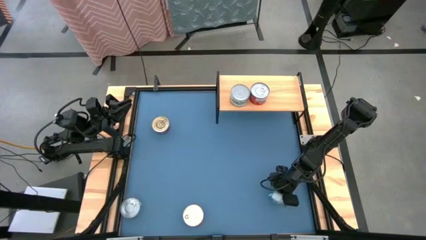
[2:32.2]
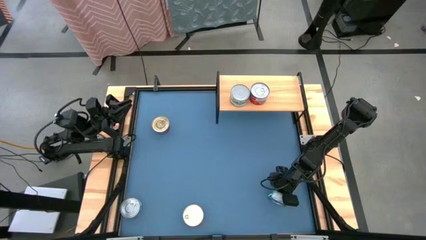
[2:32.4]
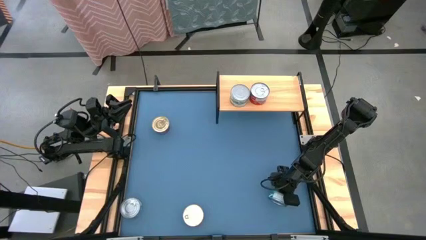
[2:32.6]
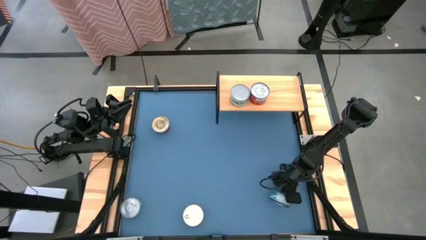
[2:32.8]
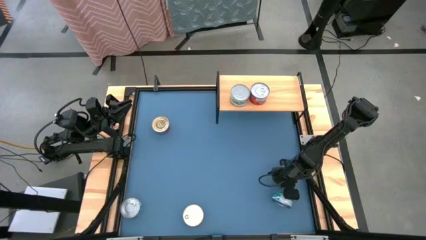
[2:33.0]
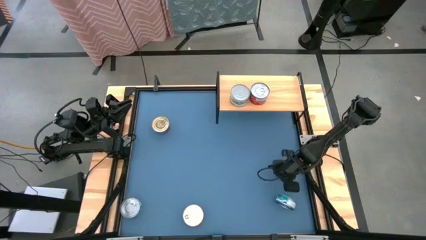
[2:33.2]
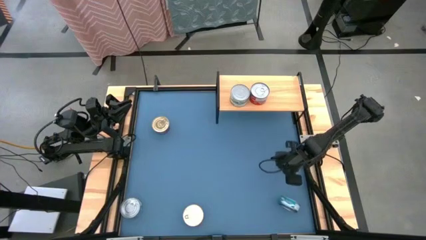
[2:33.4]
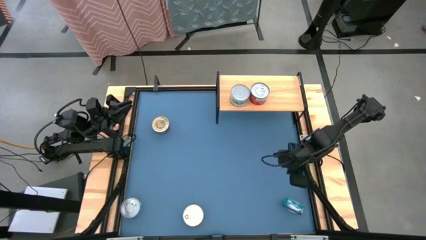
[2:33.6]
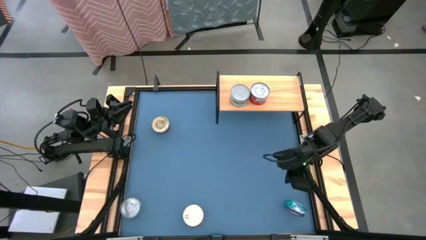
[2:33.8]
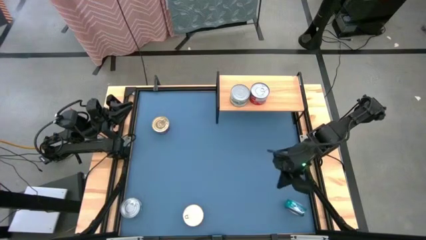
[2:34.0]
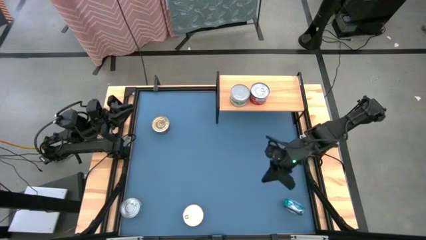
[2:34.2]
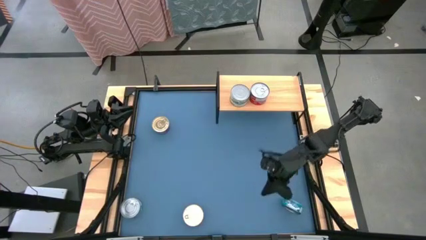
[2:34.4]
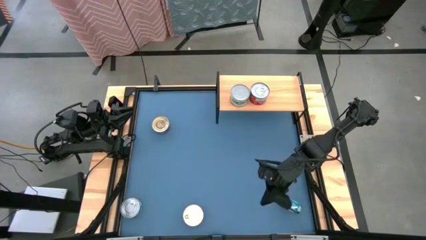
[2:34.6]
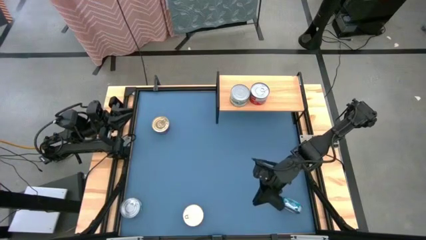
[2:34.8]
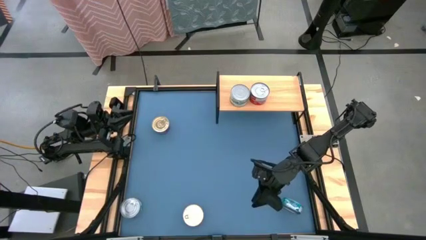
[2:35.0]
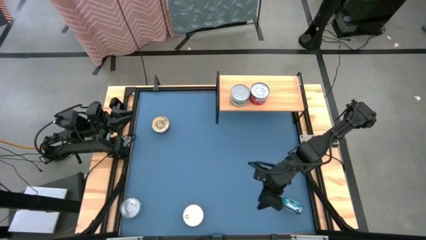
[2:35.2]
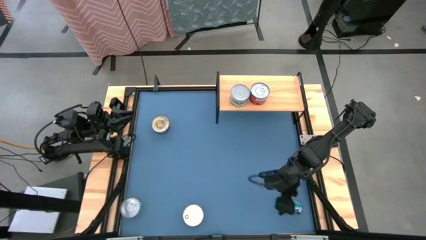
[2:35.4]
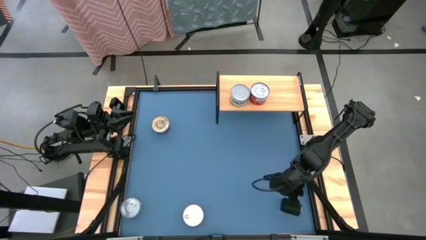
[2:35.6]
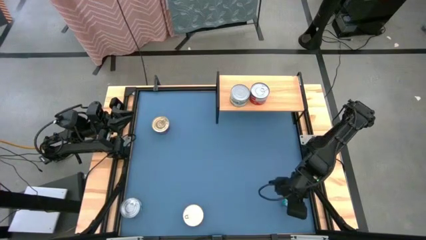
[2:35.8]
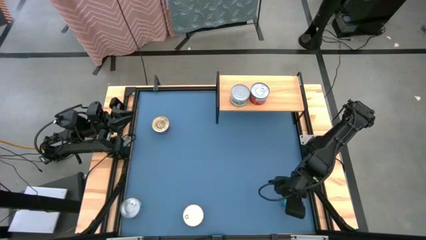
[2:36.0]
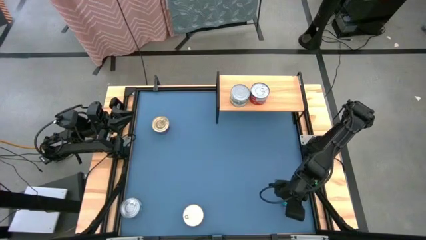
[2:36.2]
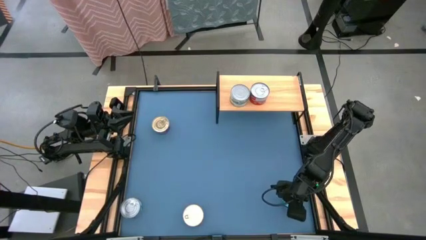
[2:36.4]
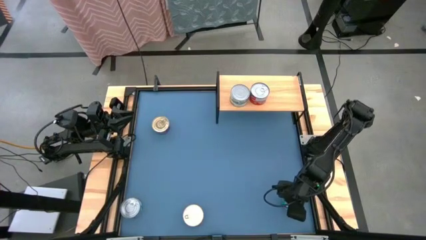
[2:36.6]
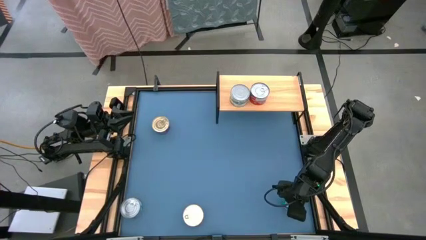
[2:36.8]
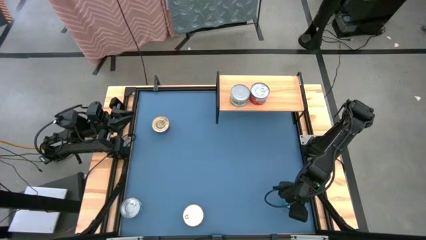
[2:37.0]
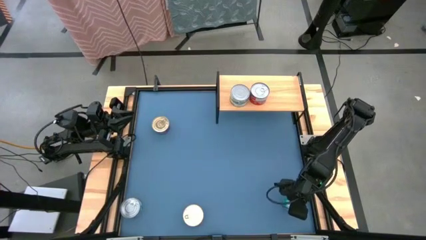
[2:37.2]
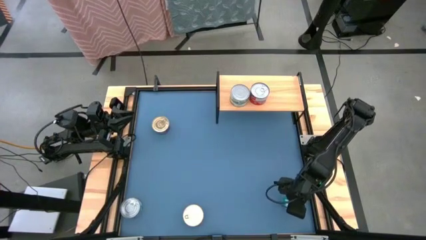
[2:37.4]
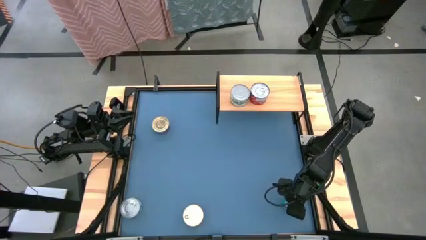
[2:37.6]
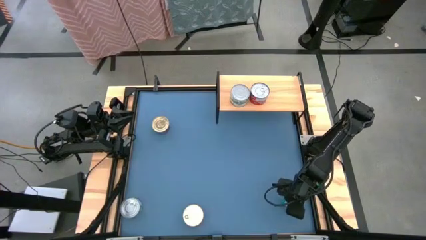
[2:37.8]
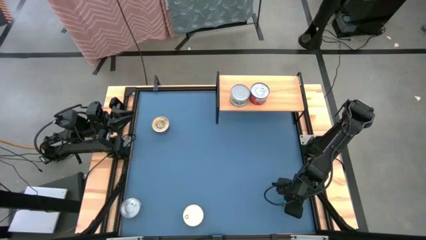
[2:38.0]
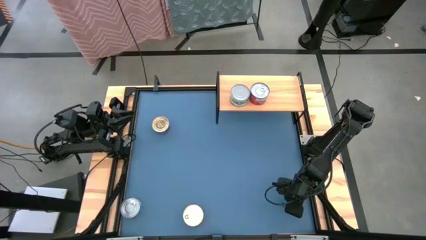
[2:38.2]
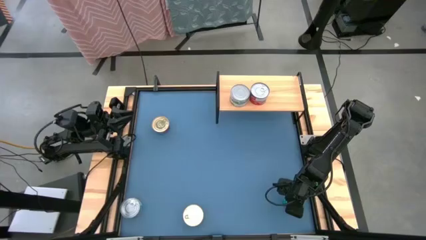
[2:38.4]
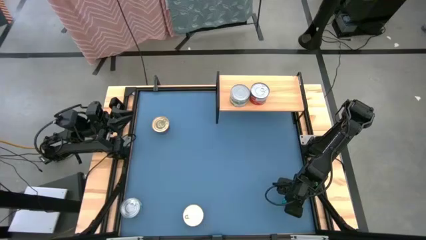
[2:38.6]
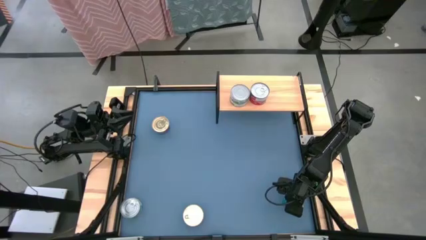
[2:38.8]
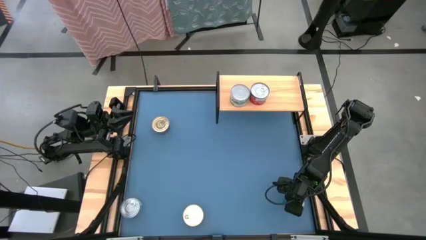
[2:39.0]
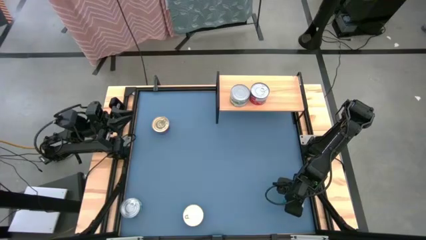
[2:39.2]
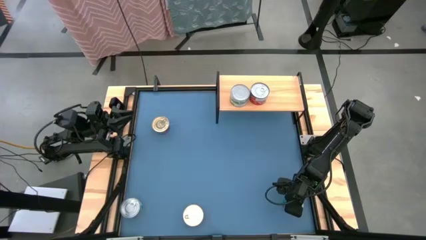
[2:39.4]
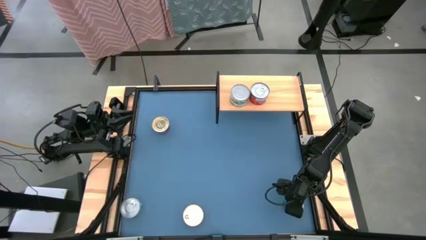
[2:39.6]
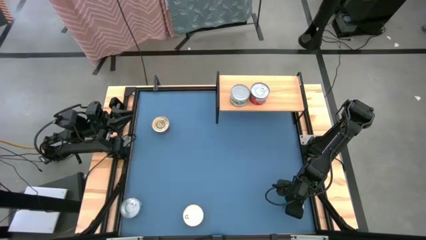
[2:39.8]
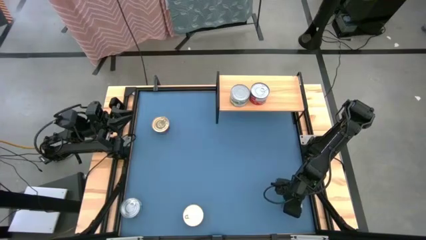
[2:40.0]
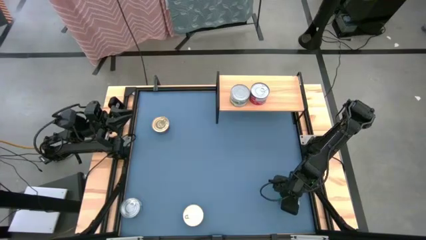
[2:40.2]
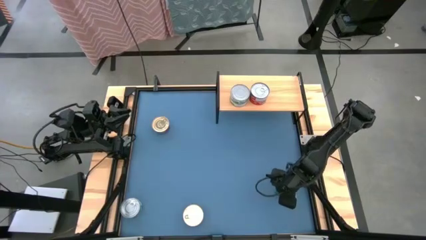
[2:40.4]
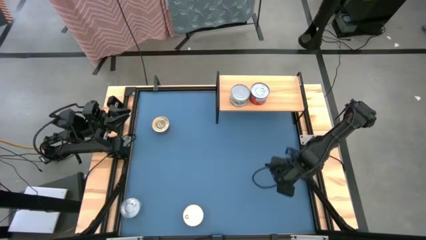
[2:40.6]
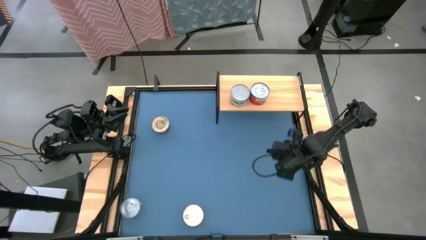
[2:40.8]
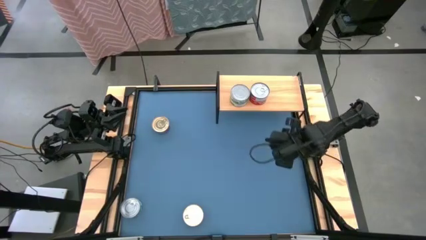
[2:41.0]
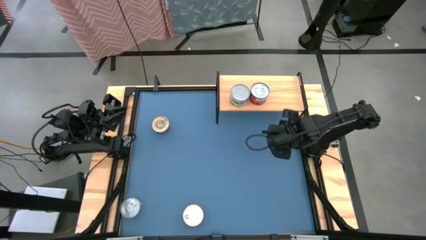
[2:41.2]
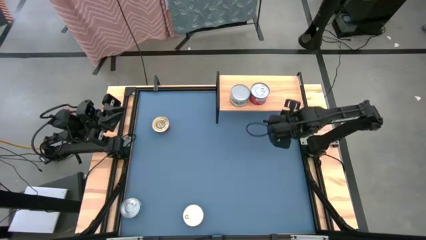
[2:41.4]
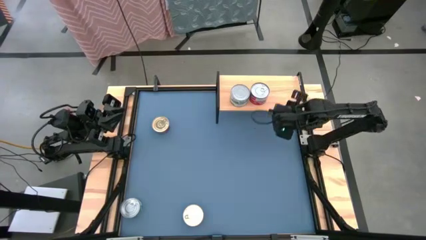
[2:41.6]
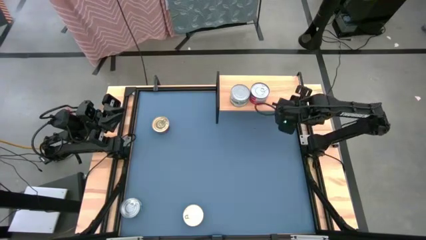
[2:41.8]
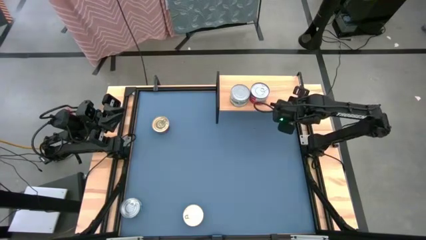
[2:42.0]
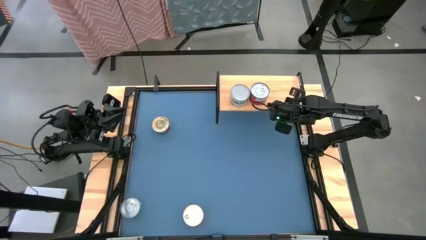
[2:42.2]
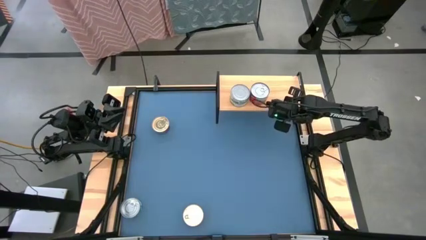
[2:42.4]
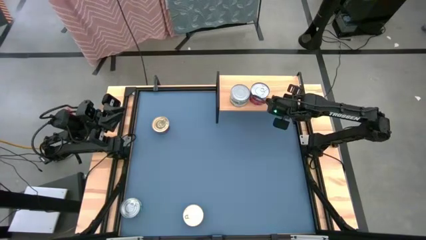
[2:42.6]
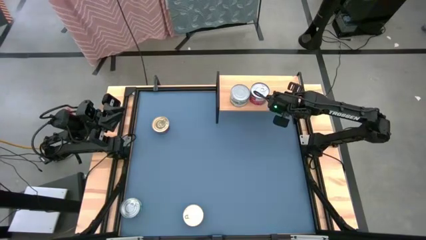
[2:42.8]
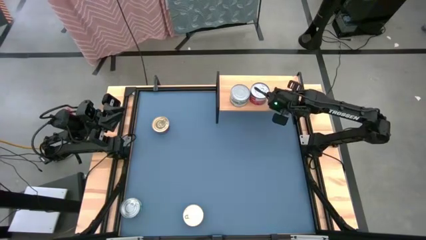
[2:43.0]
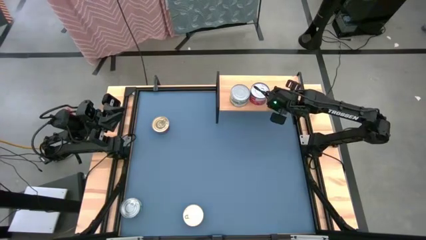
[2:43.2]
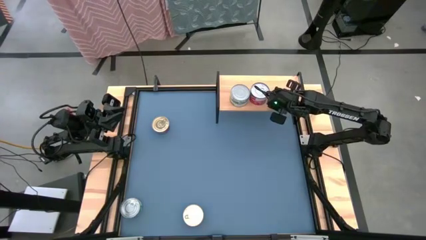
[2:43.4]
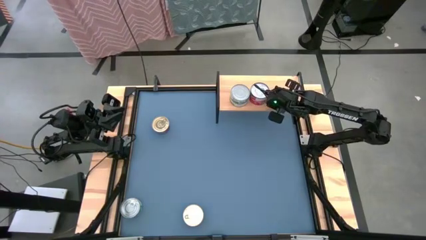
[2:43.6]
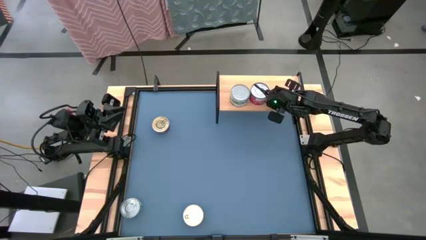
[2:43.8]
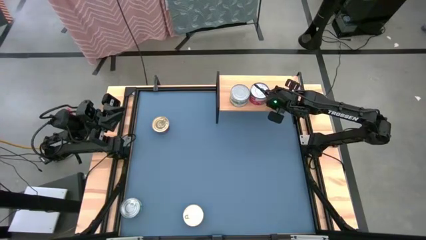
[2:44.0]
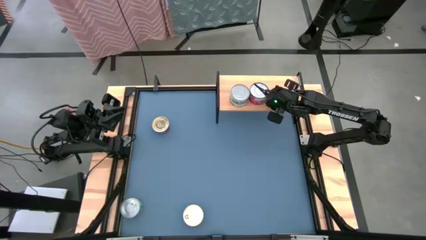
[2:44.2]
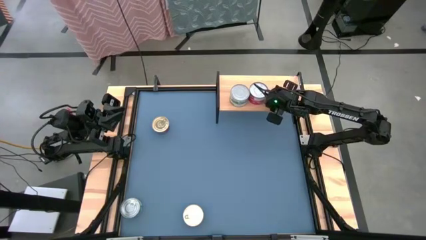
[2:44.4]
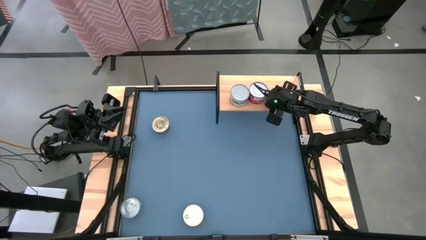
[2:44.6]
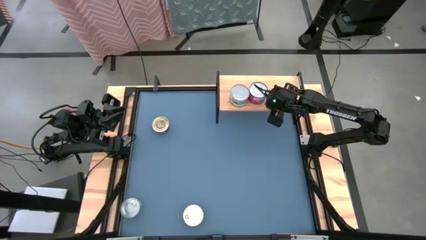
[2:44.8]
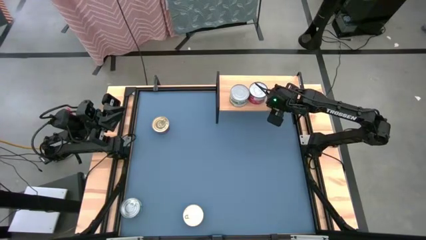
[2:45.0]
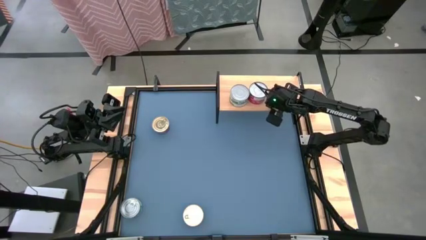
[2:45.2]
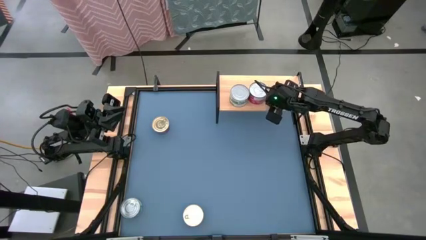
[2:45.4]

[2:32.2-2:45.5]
Task: Stack canned seafood by type on shelf
Put the right green-blue tuna can on the shelf

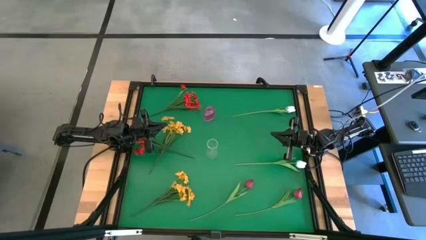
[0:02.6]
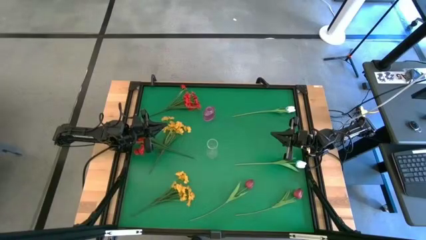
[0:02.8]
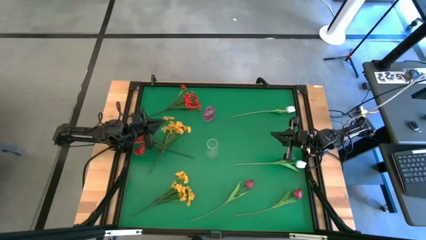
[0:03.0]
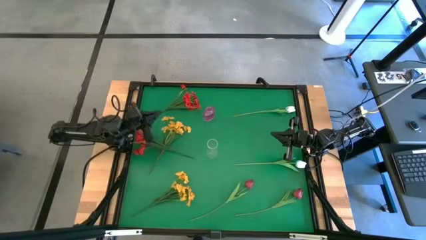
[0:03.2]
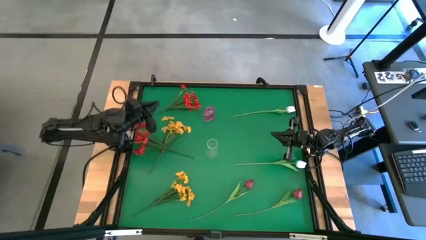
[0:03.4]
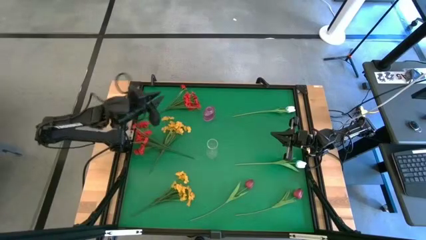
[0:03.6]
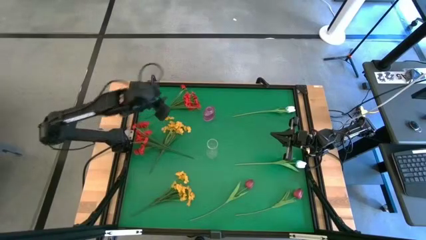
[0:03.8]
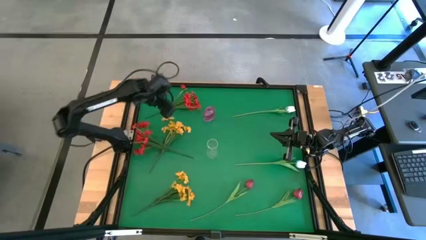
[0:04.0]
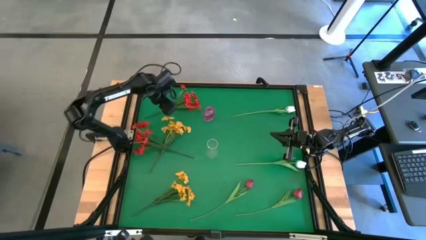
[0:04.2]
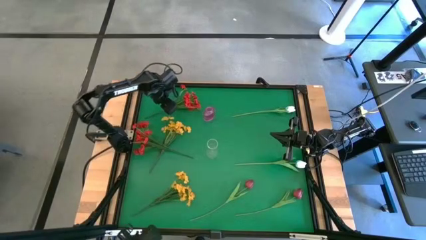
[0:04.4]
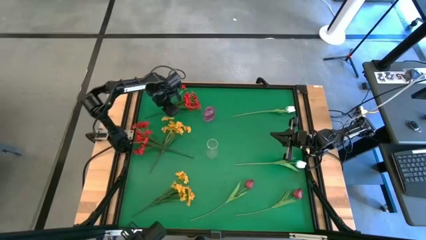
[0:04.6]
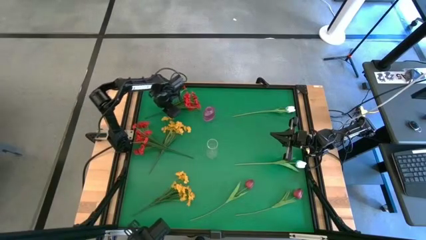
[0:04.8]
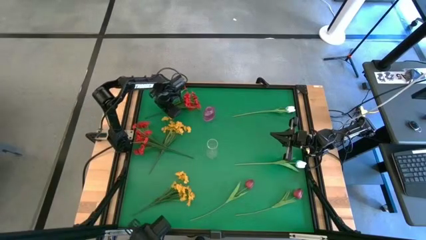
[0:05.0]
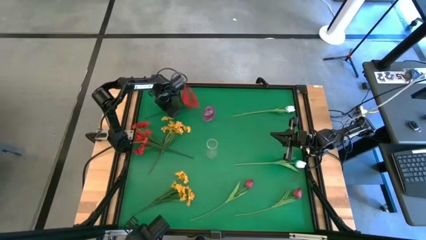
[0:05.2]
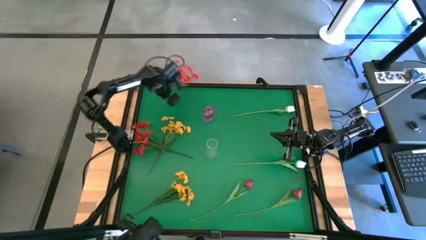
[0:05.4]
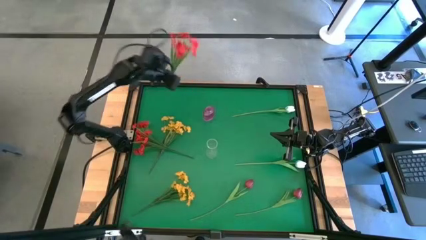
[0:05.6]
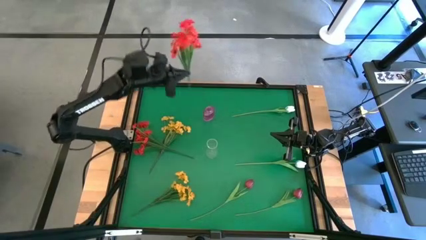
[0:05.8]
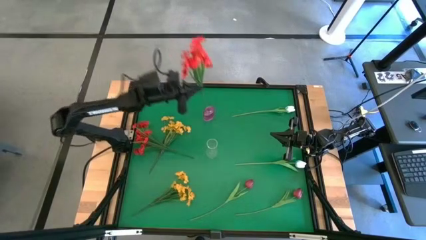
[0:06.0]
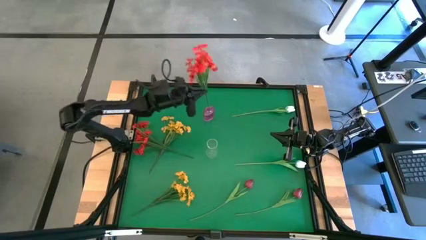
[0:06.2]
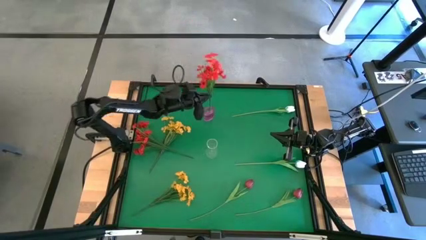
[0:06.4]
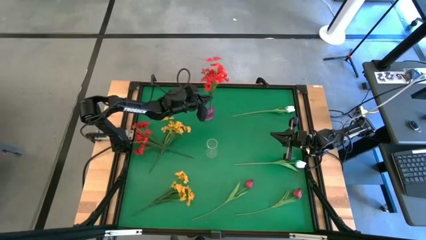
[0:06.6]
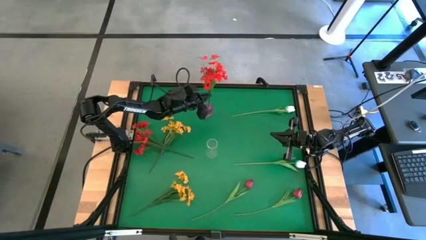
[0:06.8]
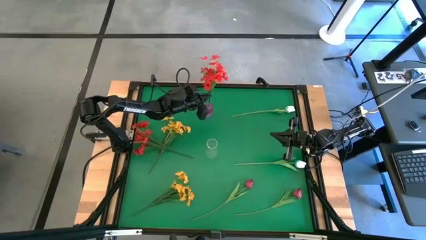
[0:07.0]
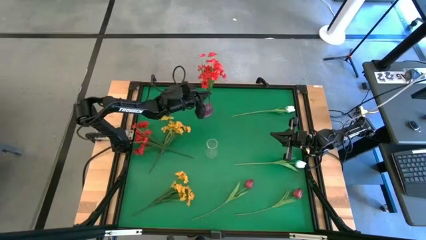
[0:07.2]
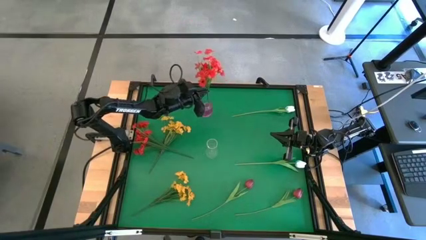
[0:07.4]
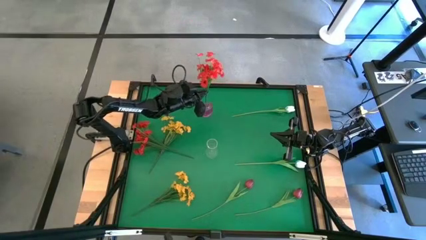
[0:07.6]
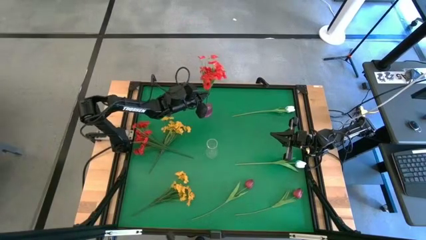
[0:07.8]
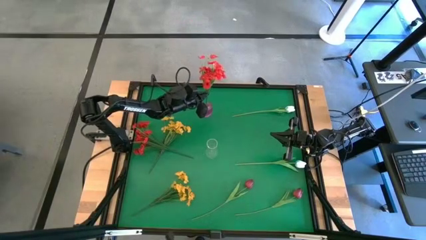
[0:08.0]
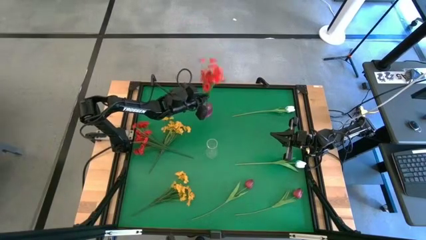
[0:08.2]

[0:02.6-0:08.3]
Task: Sort flowers into vase by color
Put the top red flowers into the violet vase
